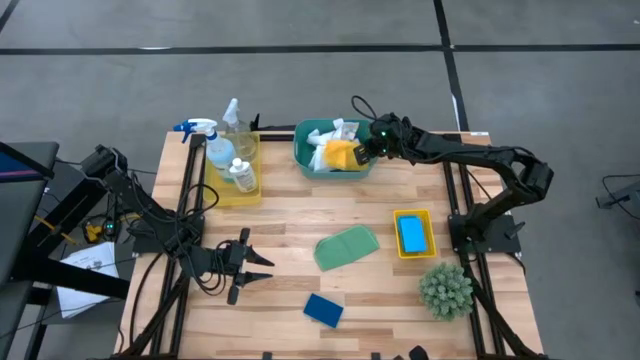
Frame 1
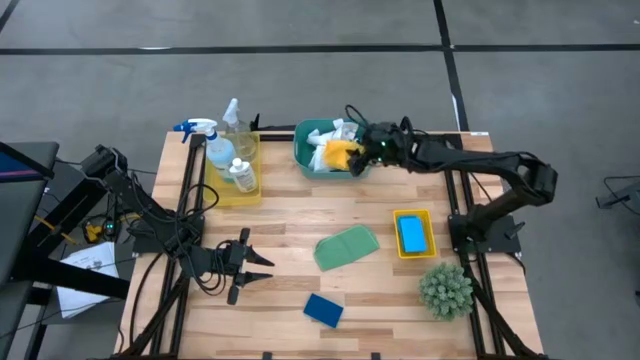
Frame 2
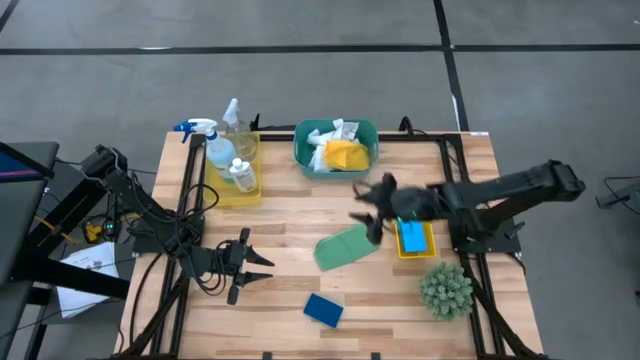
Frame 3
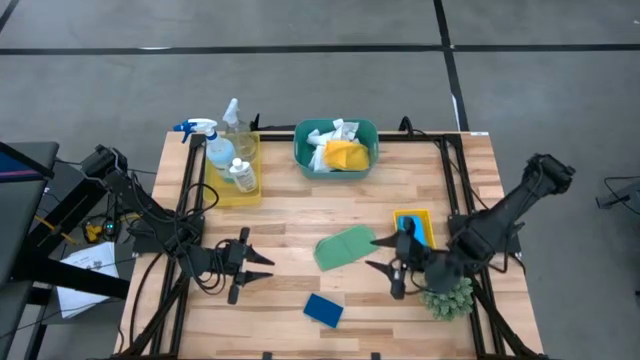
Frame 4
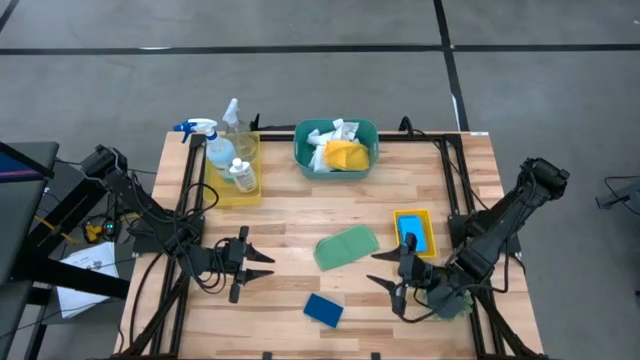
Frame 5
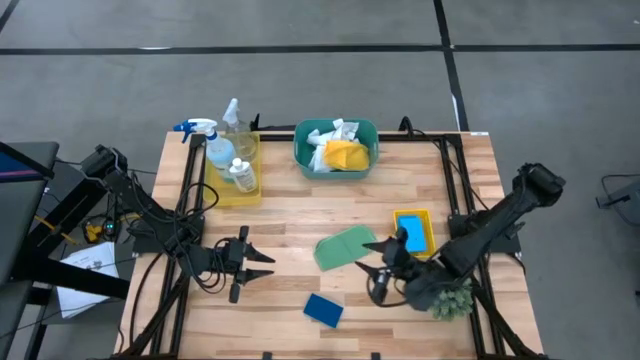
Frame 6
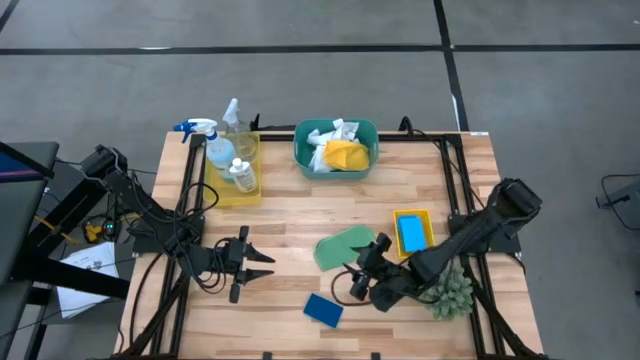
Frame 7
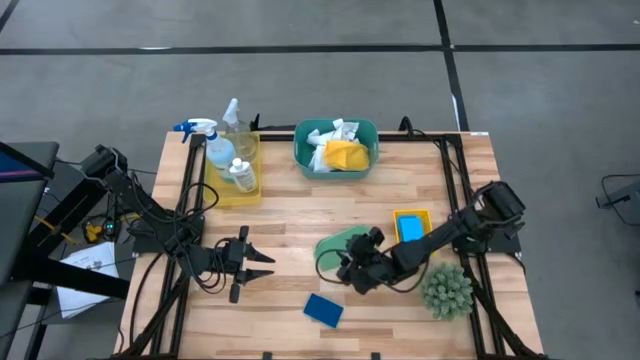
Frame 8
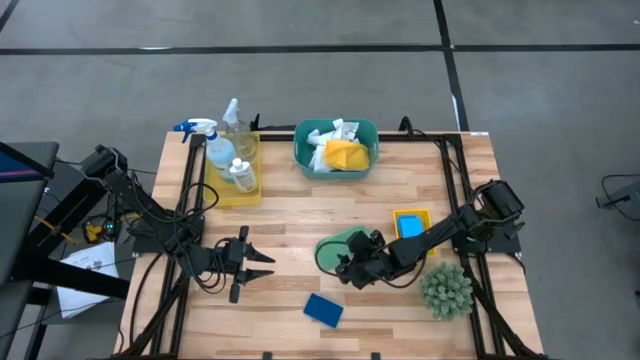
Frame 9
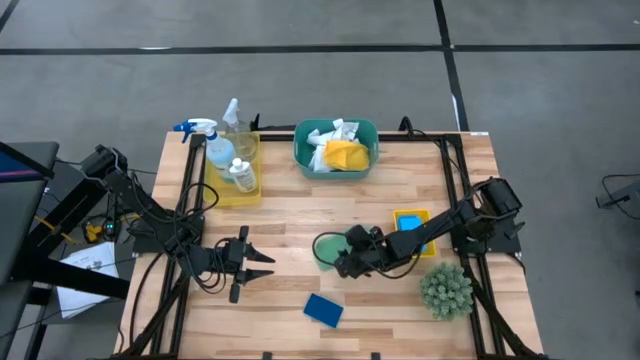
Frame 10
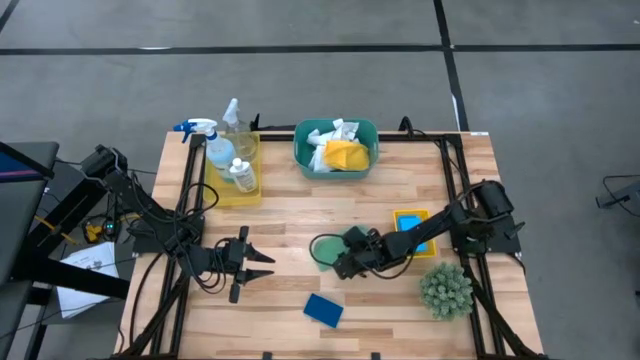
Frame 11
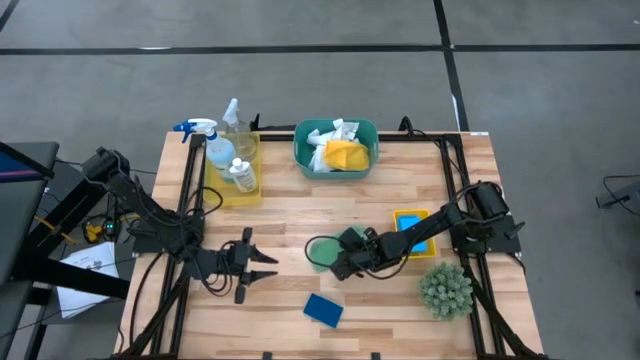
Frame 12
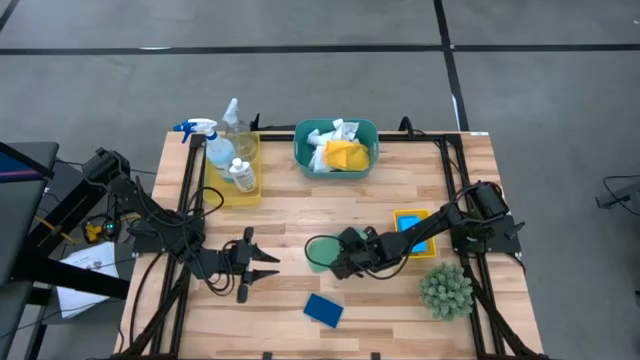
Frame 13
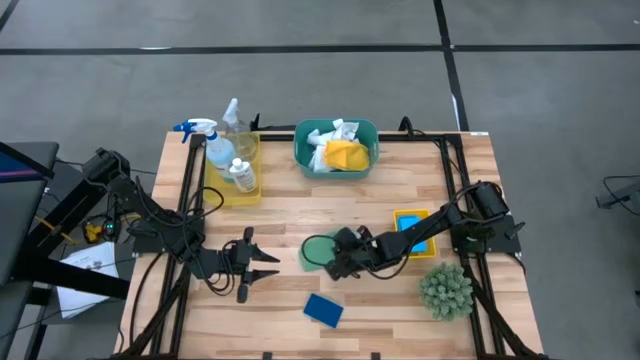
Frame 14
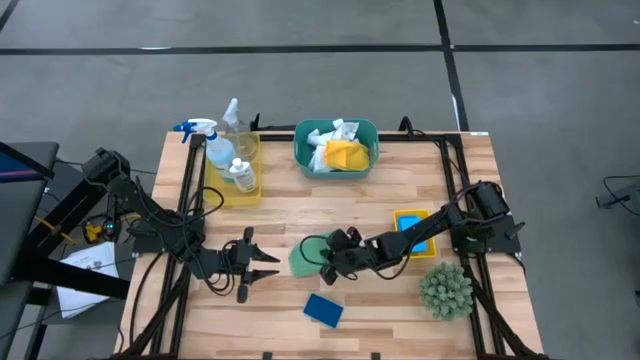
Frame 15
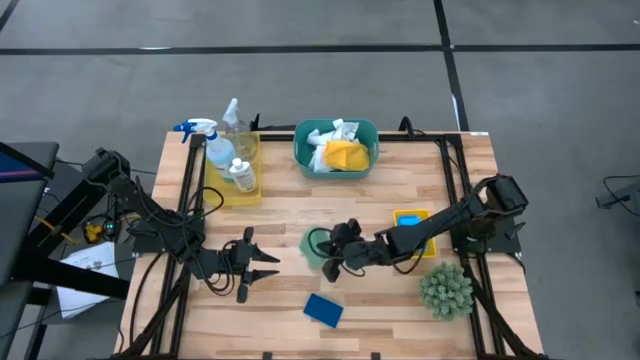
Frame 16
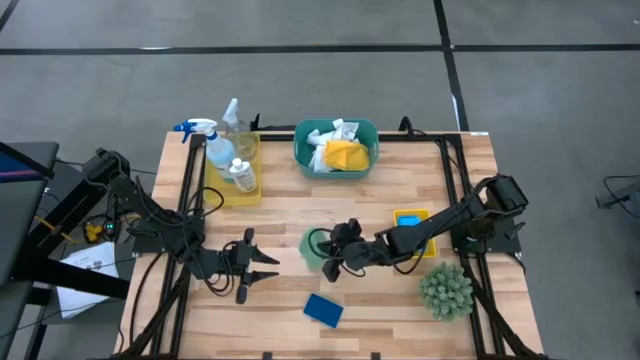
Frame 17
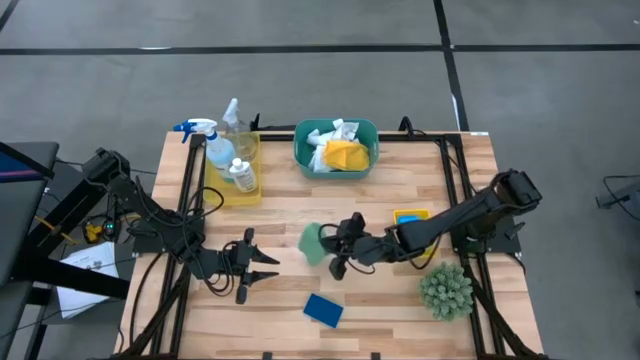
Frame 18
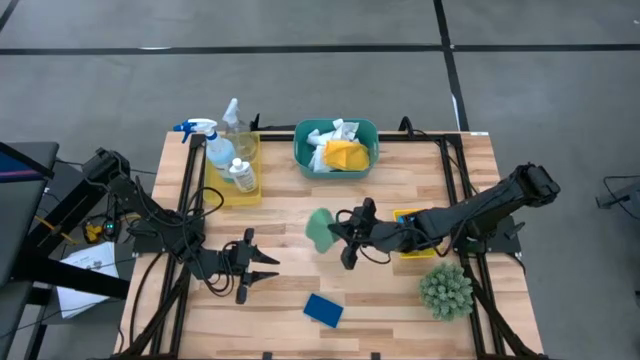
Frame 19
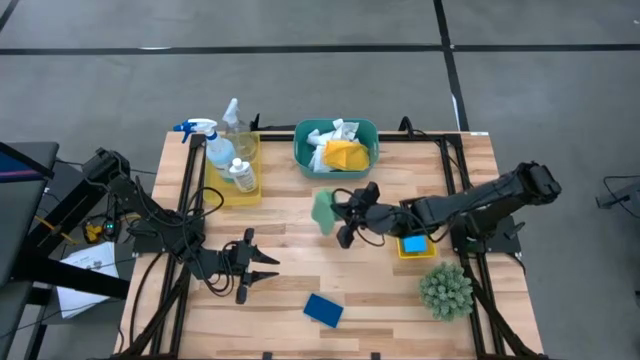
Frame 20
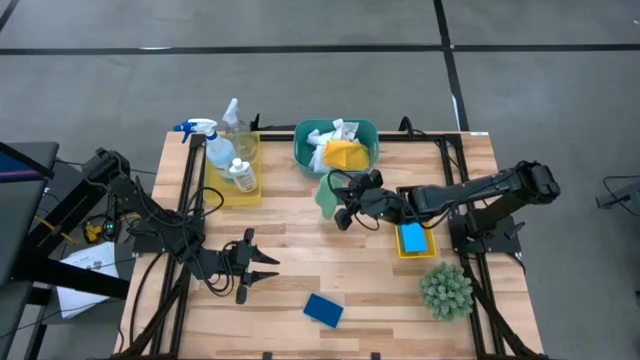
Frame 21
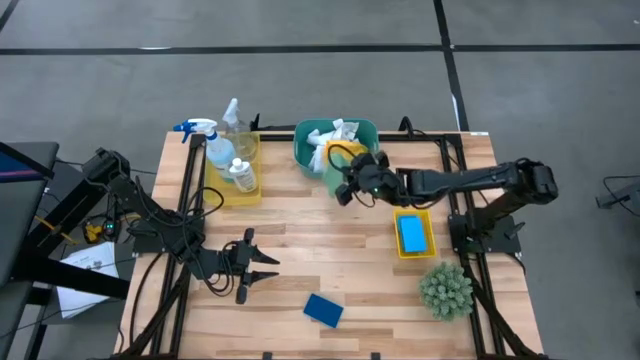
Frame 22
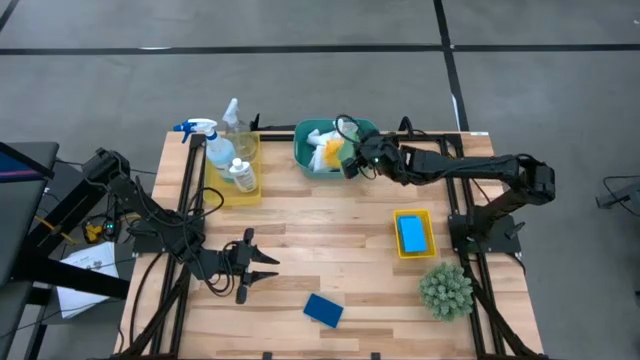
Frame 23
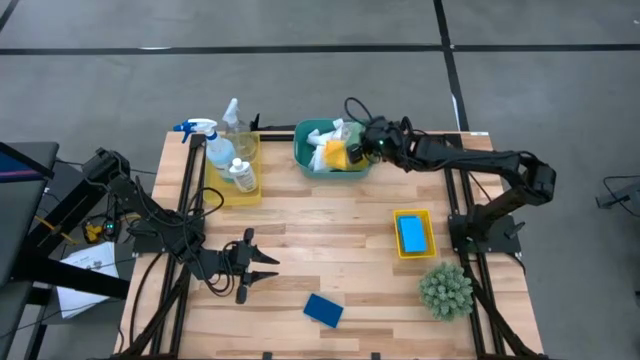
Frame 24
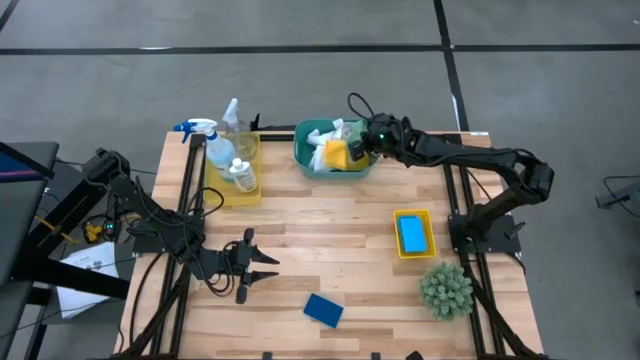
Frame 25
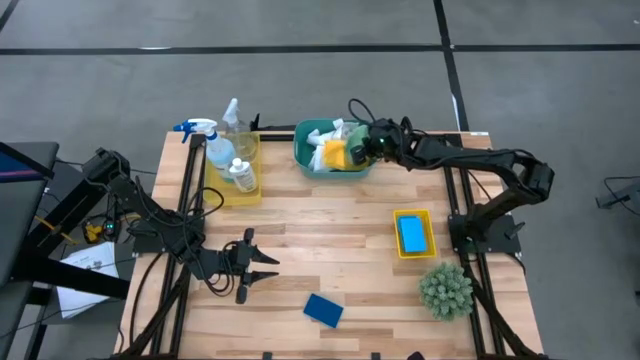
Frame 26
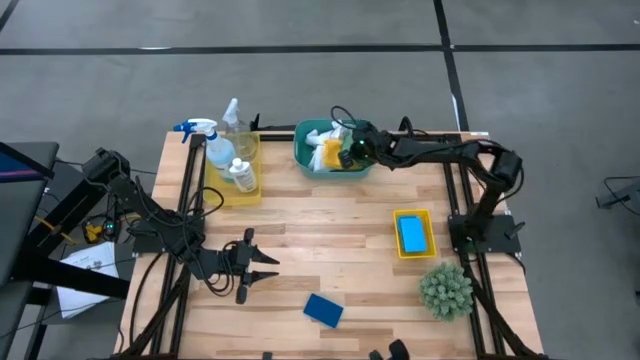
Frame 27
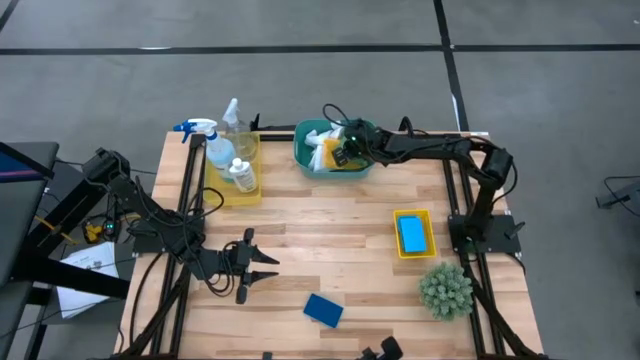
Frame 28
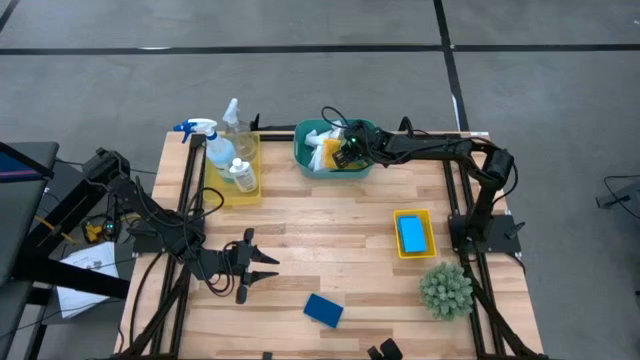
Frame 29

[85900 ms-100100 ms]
Task: Pick & Place Kitchen Items
Put the green cleaning cloth into the green bin

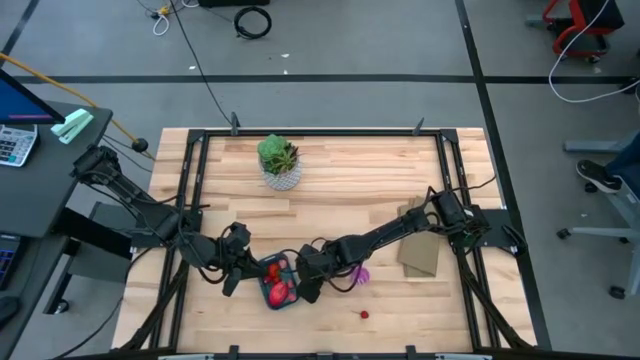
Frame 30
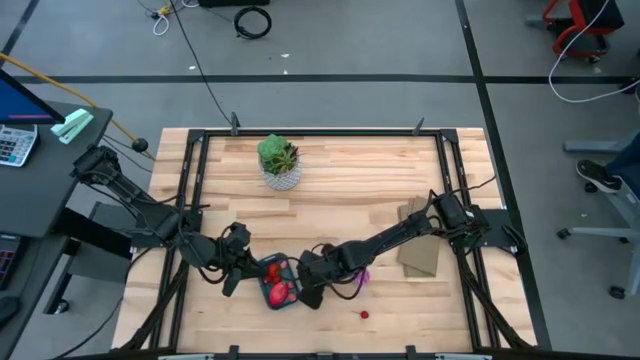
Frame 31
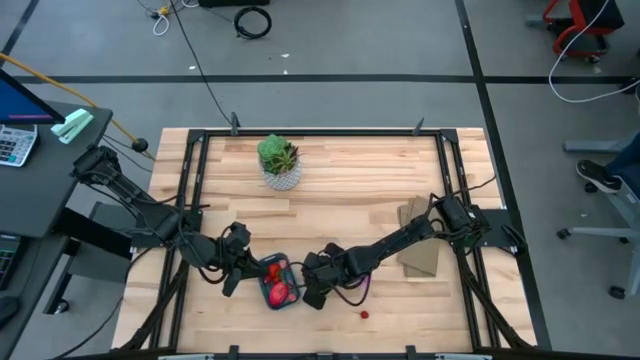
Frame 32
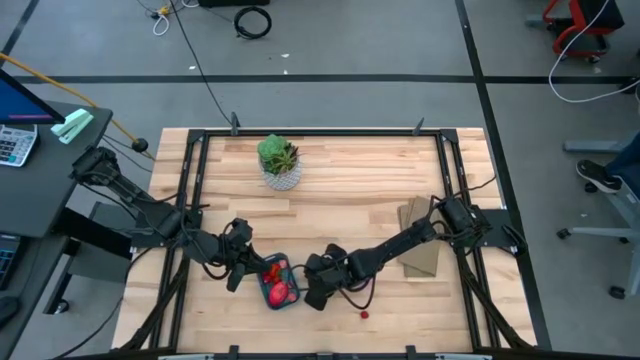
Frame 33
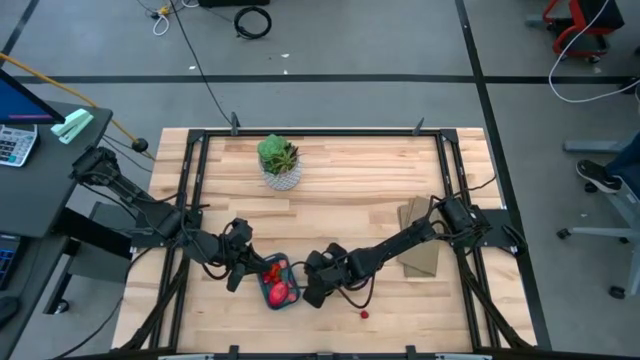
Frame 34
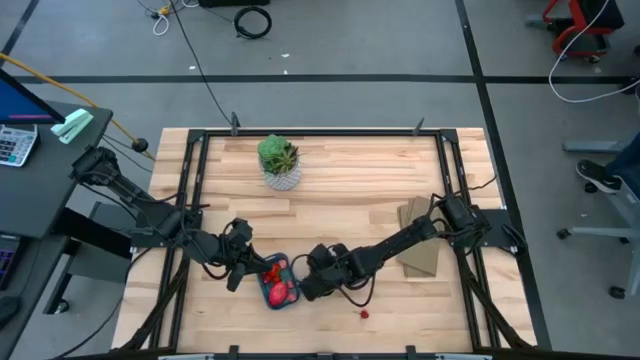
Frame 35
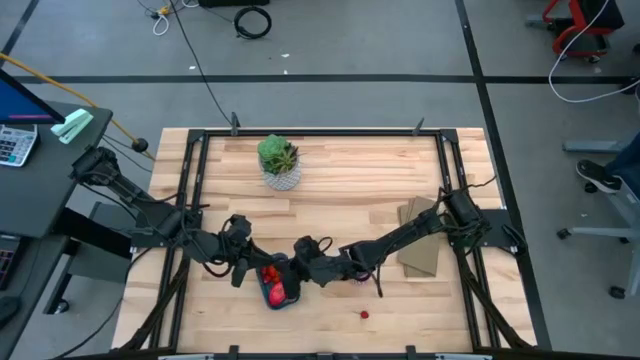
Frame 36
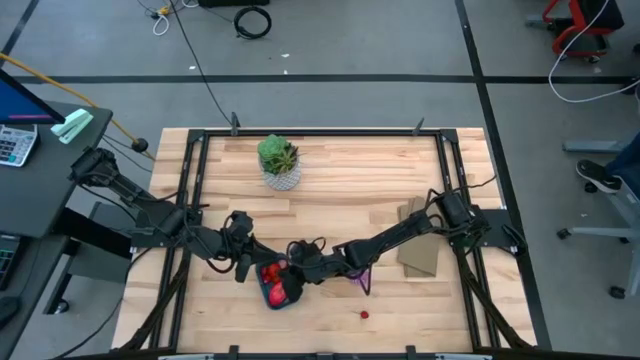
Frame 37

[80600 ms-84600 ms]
Task: Pick and placing Produce into tupperware
Put the left red cherry into the bin

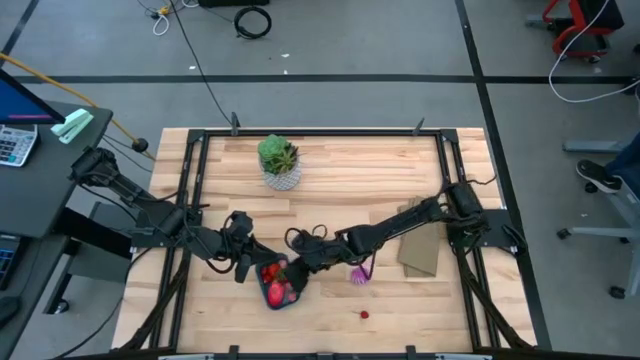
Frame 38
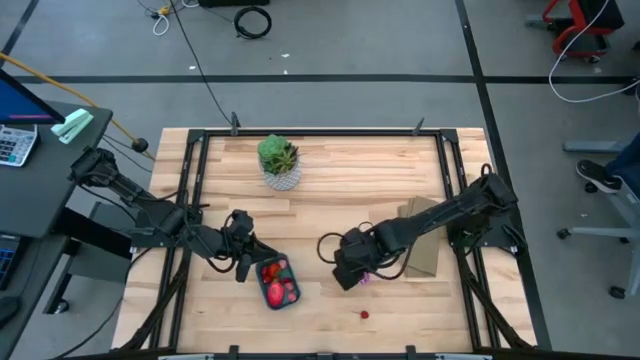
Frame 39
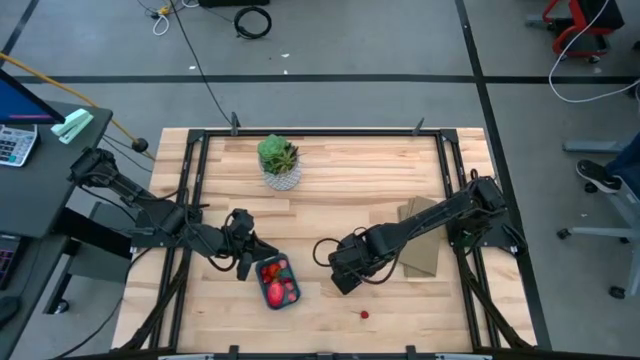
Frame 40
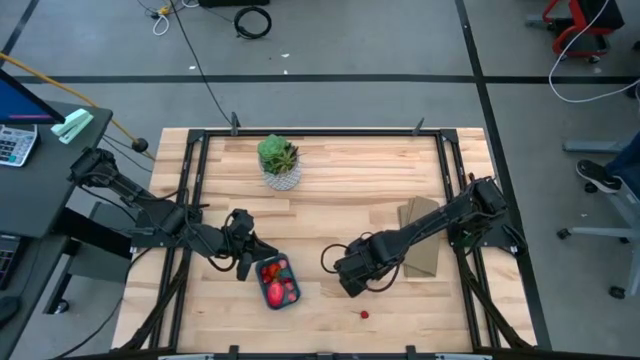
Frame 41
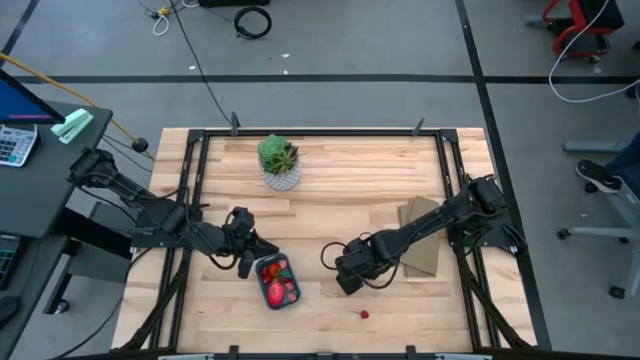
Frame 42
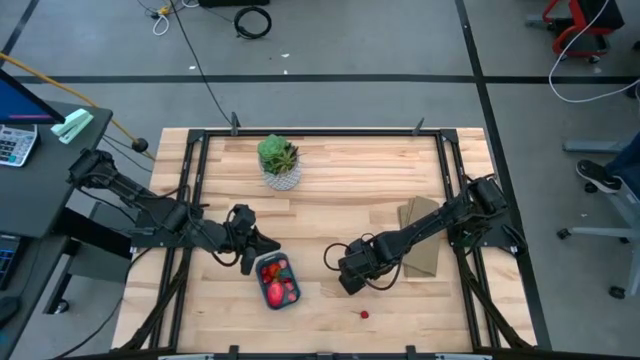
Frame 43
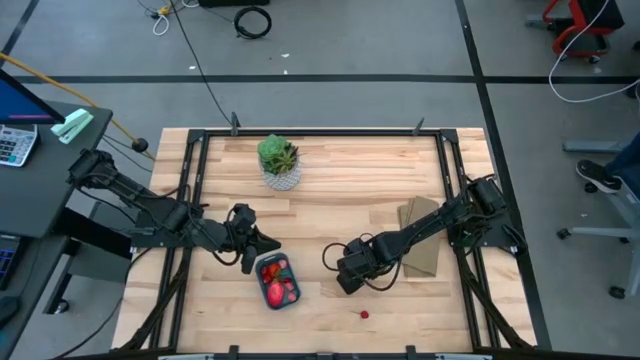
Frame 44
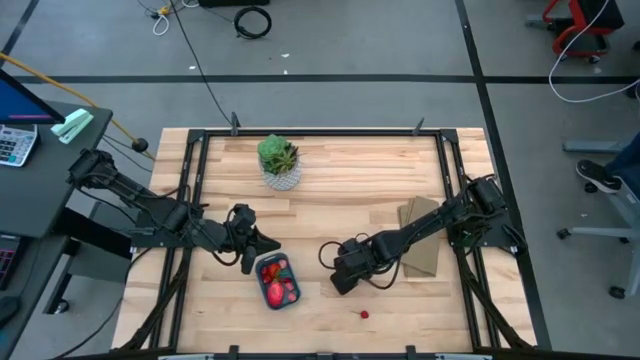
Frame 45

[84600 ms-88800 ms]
Put the purple onion into the bin
